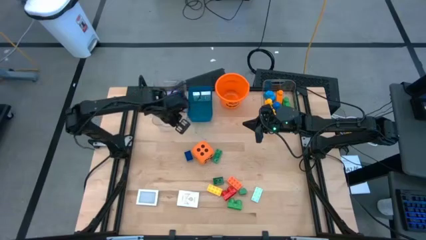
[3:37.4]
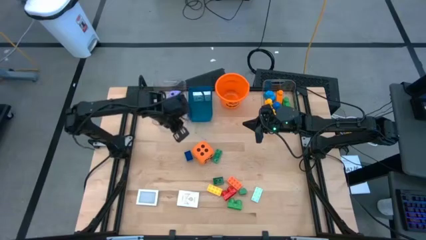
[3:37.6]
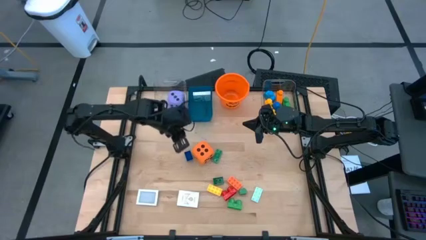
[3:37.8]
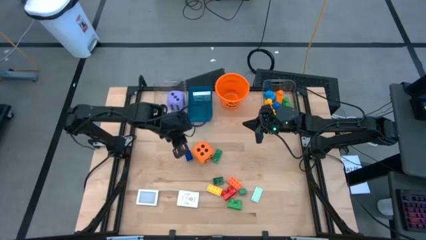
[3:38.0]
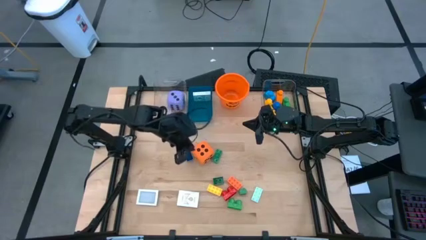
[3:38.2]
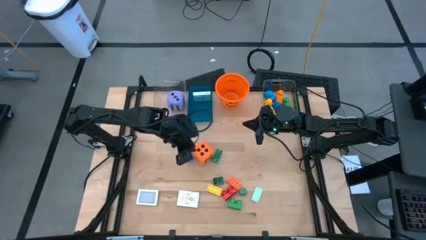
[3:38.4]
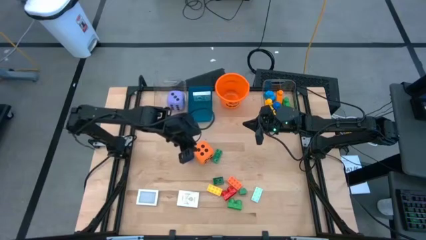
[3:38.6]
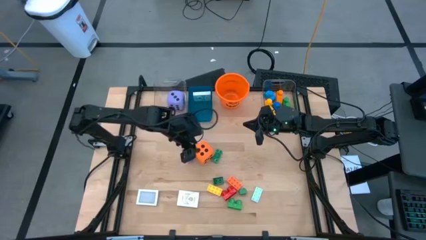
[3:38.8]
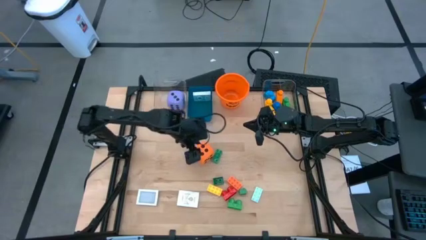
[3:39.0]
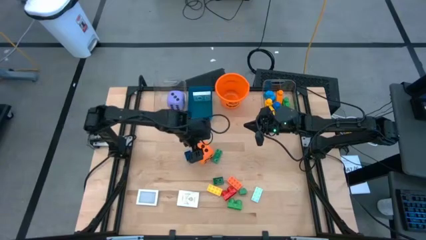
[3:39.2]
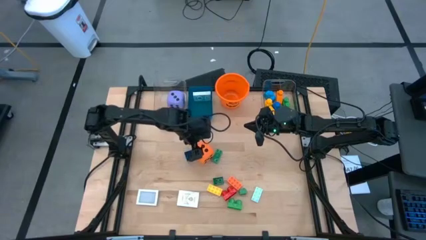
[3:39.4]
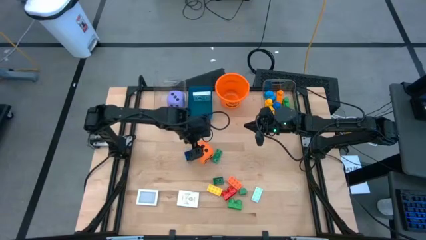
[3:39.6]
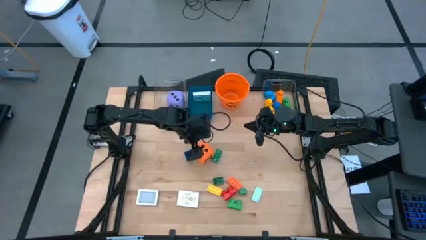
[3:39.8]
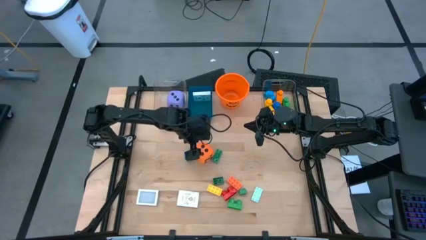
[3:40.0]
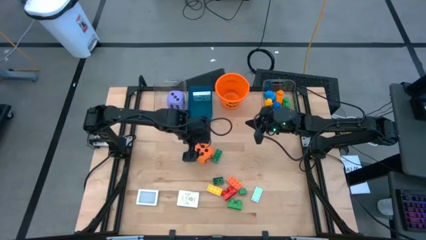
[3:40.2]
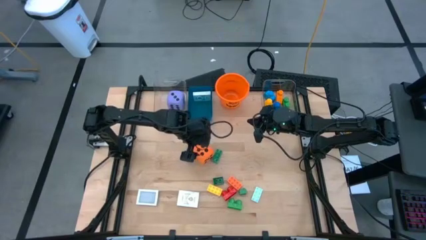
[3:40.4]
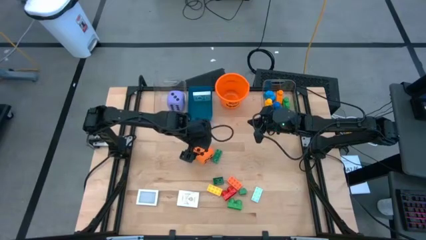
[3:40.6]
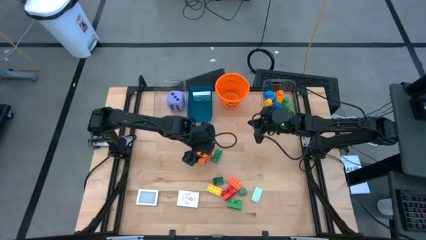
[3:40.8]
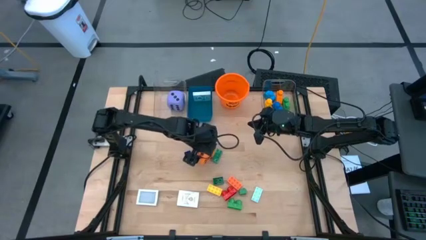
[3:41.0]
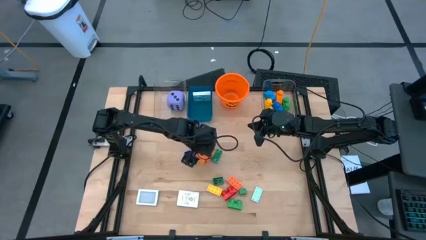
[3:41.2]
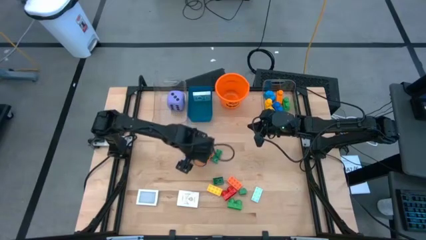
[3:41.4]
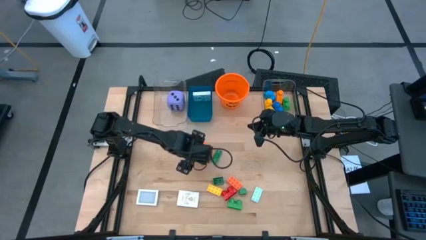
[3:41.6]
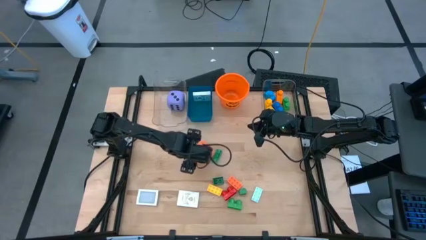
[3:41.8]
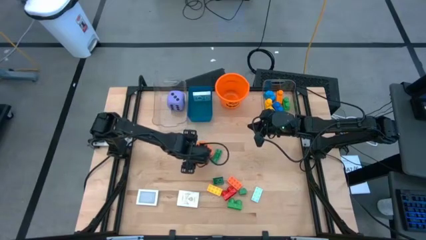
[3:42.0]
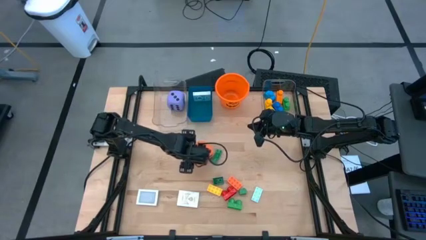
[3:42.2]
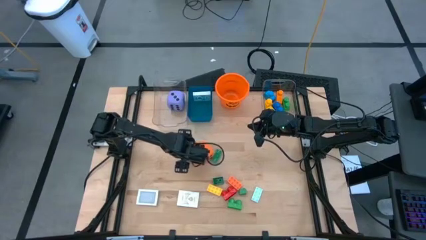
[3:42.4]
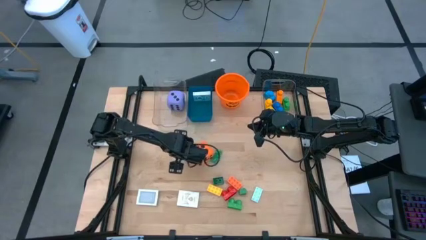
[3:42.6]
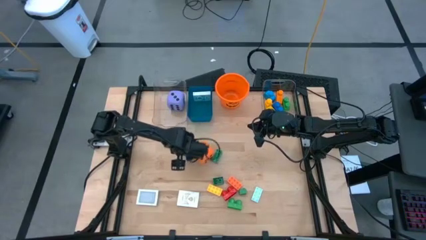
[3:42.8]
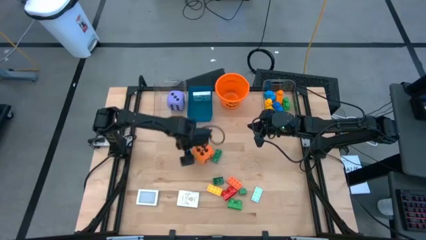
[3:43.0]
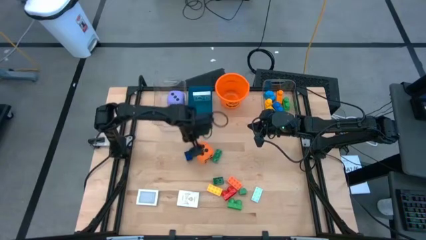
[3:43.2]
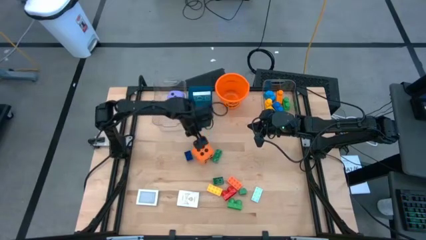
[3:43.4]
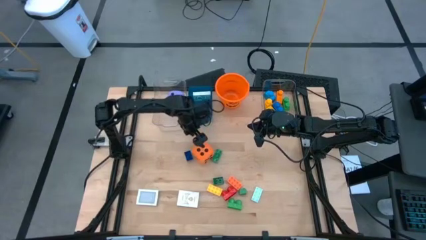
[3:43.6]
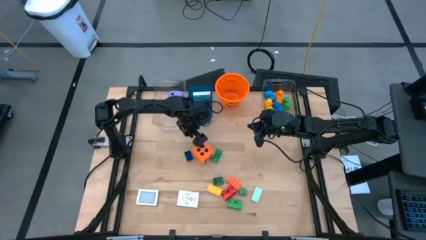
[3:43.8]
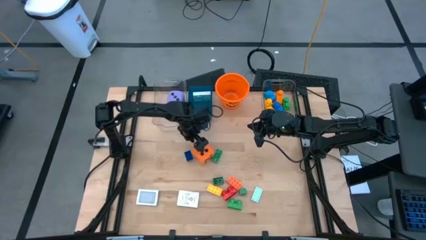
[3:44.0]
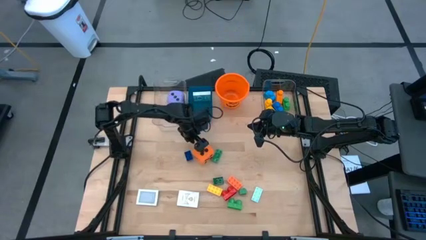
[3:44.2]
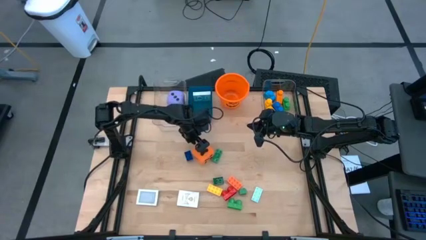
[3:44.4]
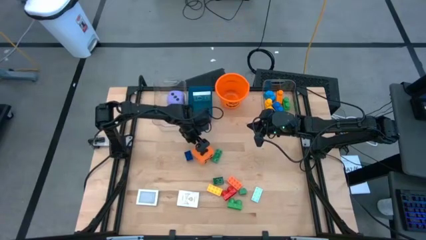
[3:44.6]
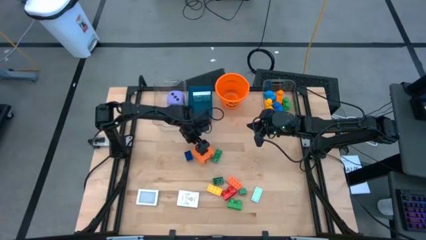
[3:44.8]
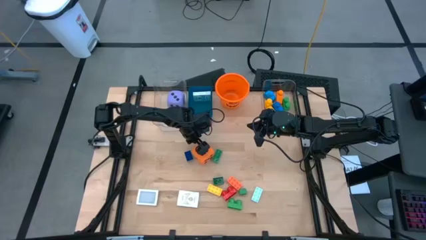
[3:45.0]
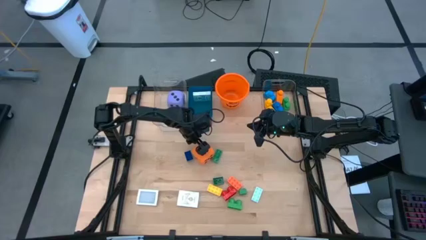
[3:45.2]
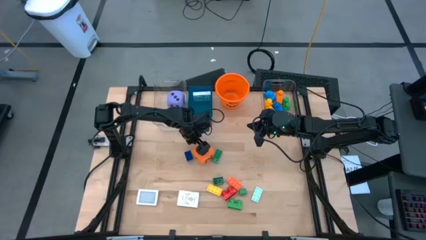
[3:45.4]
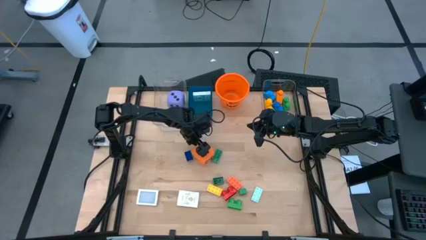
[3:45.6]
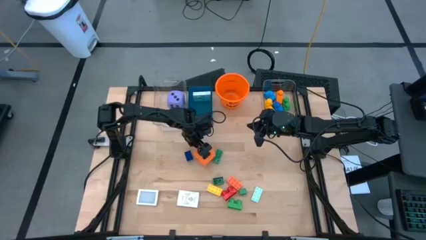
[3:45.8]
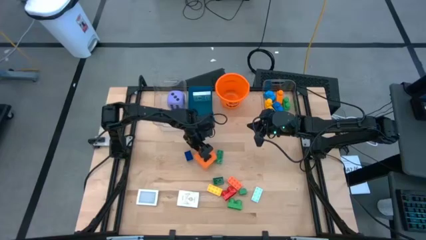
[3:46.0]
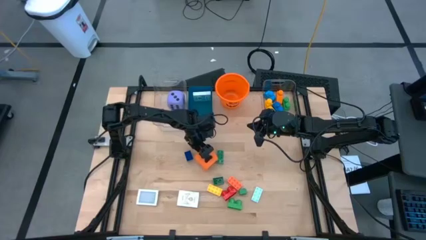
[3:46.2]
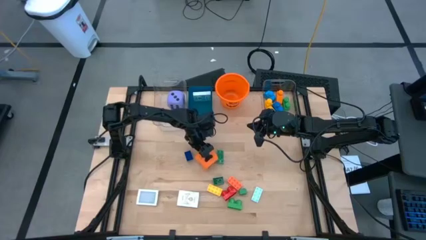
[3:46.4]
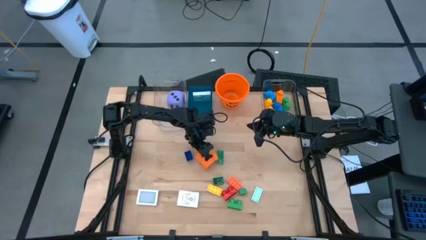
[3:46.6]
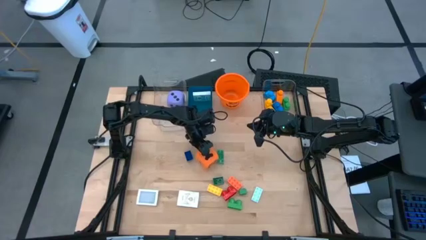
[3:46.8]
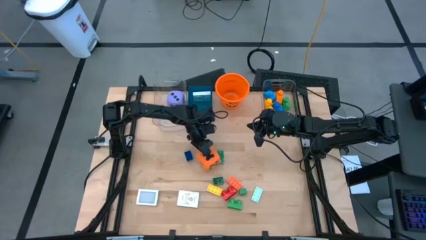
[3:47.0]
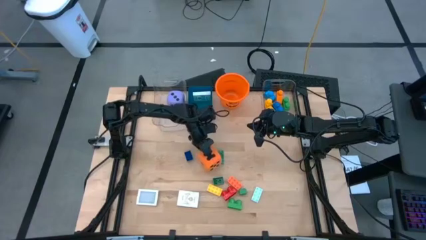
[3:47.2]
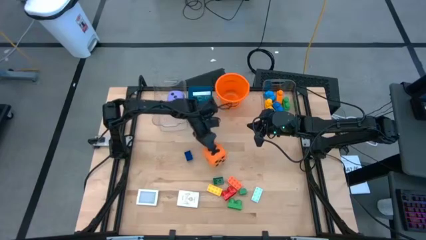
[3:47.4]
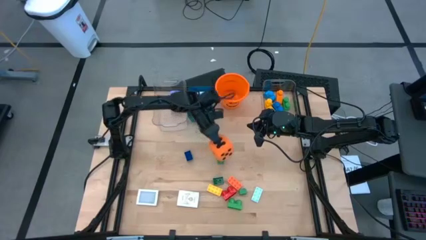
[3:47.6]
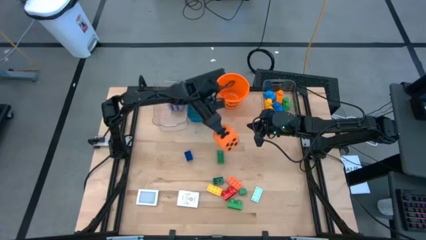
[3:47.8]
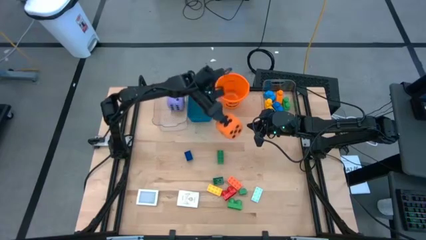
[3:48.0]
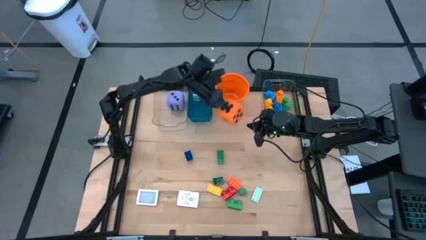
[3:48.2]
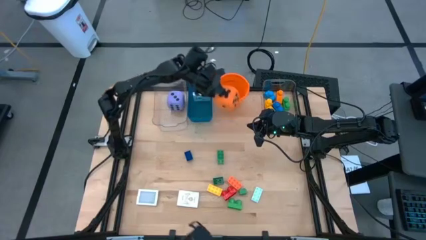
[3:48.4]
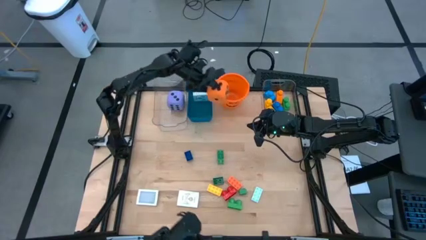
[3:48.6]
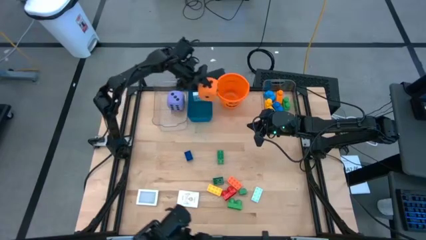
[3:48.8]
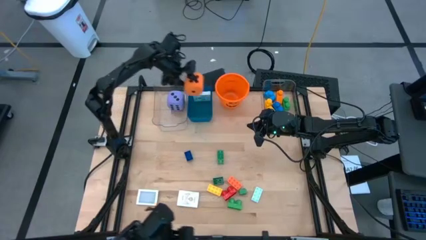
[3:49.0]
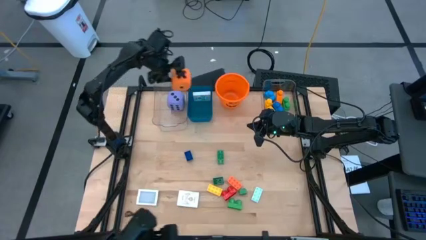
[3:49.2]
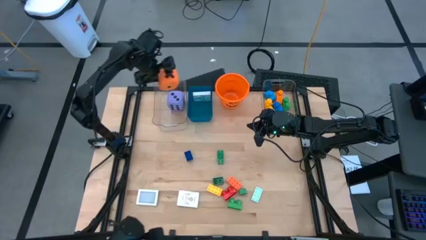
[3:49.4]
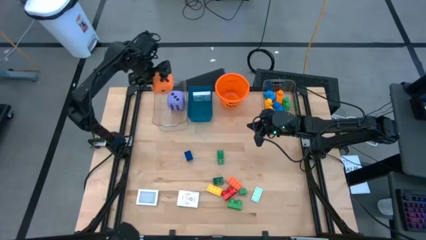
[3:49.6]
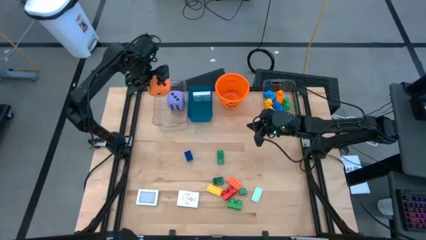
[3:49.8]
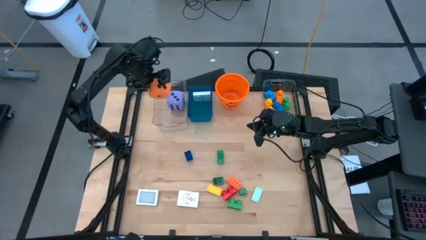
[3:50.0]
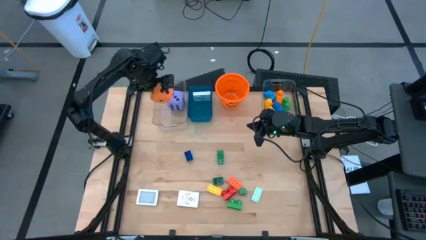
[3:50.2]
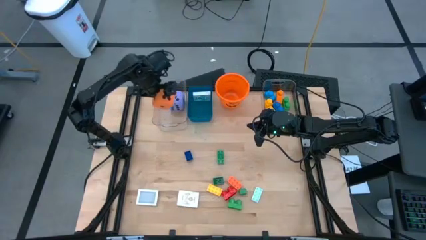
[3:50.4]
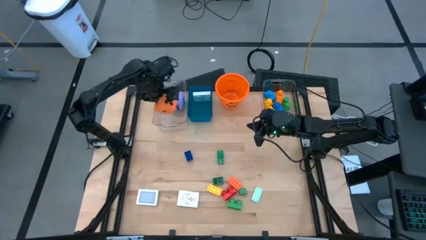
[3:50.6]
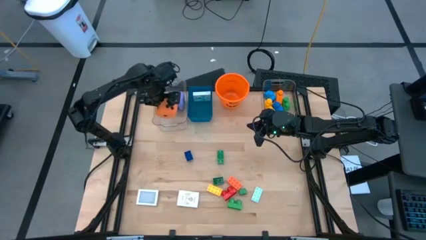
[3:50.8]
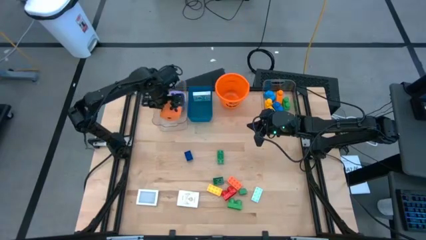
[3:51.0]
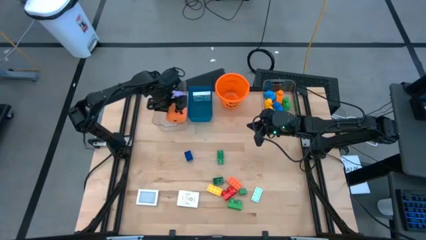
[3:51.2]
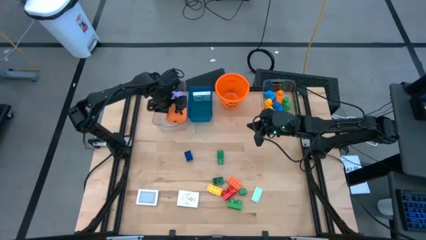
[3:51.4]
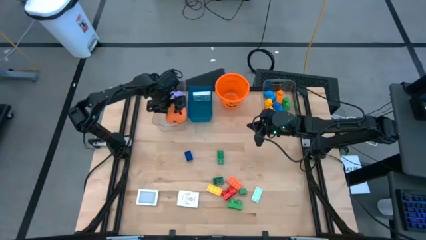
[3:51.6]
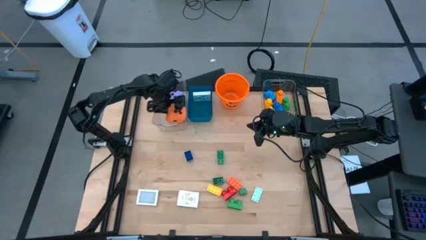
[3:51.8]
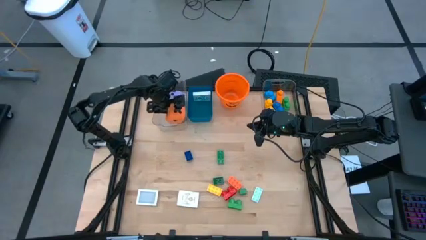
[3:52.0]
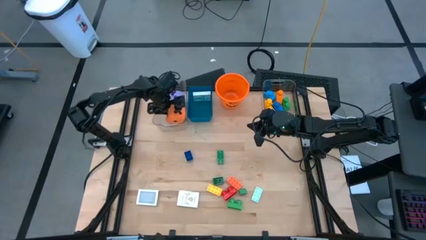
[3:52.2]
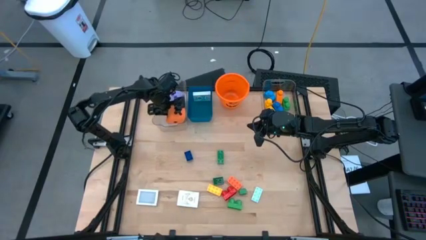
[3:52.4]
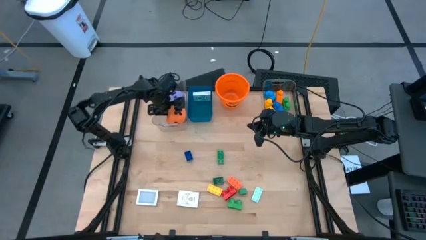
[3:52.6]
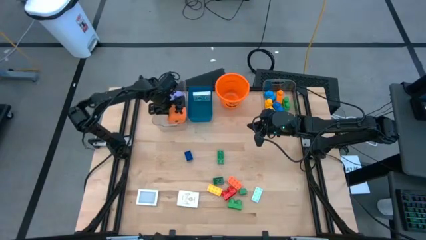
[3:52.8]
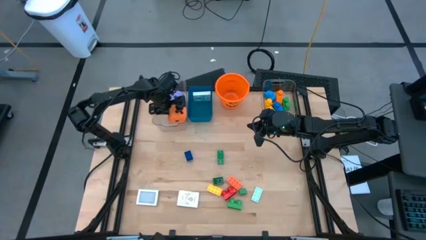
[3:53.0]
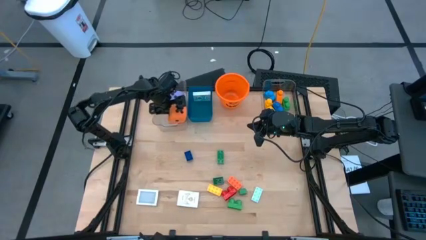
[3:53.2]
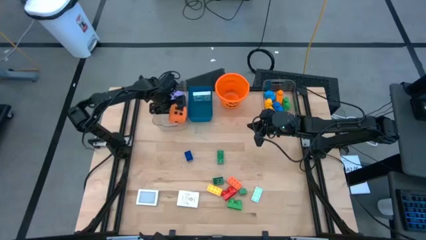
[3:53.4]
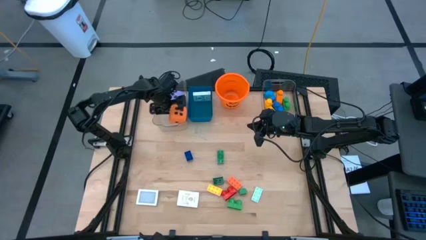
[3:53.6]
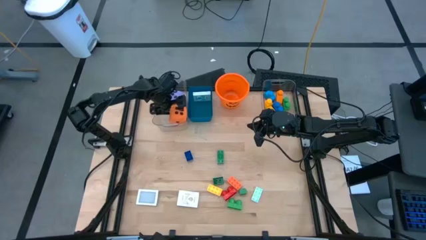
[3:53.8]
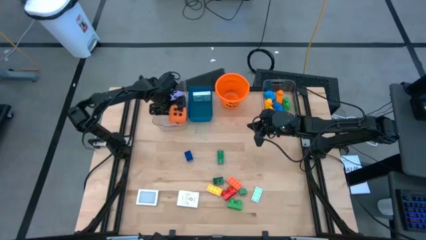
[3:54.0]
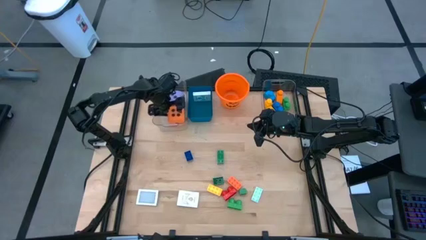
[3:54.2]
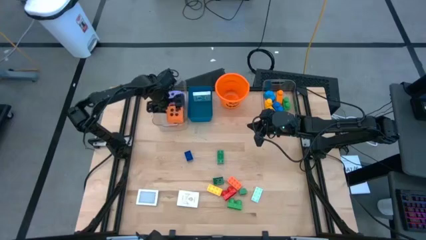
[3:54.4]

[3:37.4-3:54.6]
Task: Pick & Place Toys
Put the orange dice into the left transparent bin
